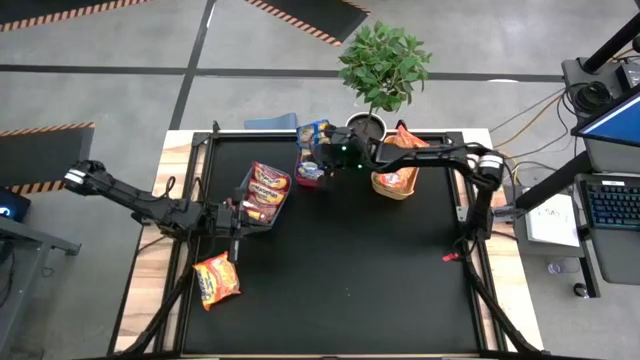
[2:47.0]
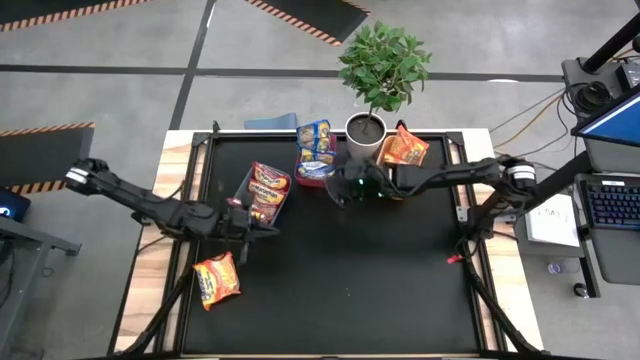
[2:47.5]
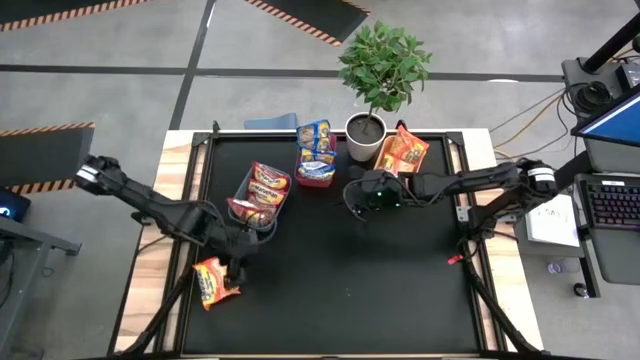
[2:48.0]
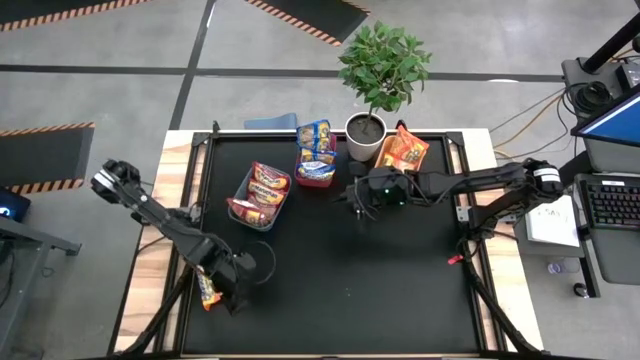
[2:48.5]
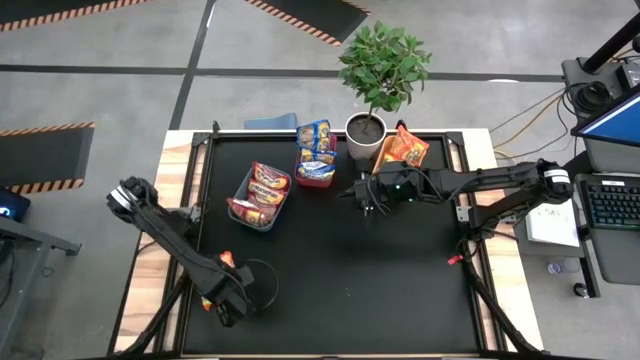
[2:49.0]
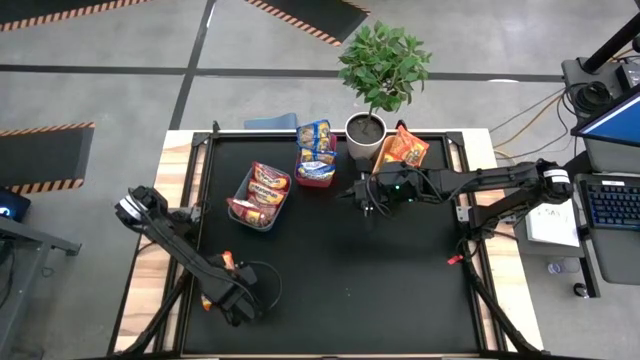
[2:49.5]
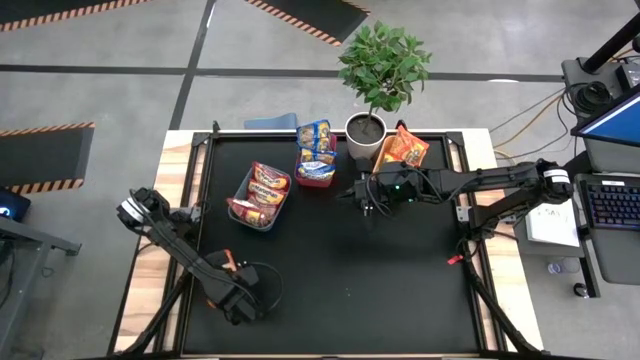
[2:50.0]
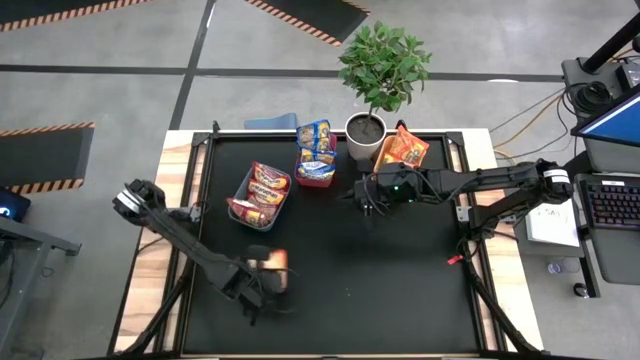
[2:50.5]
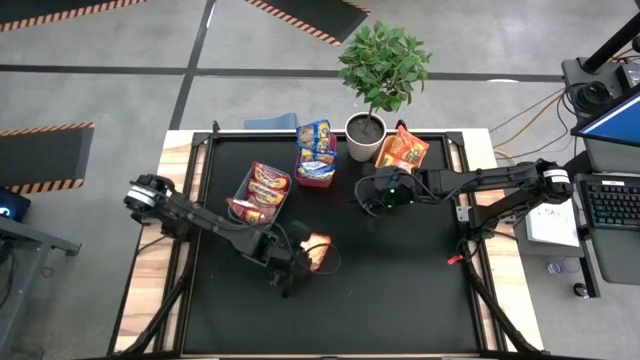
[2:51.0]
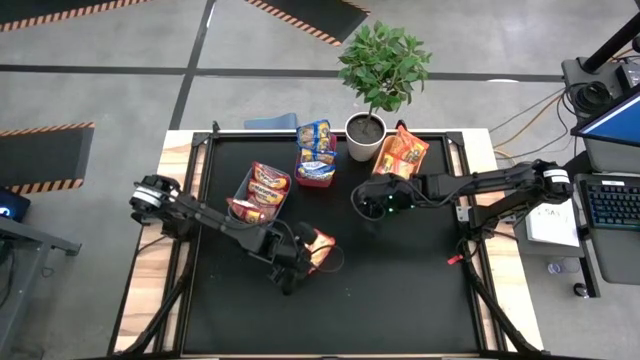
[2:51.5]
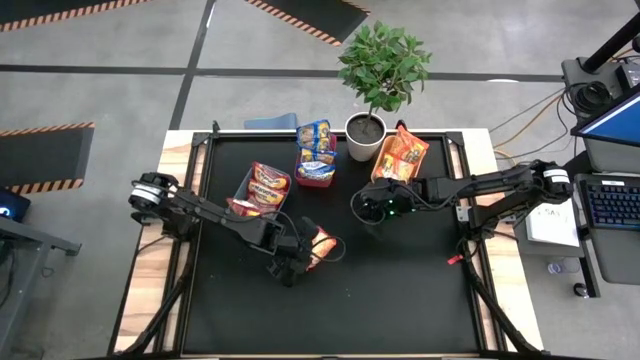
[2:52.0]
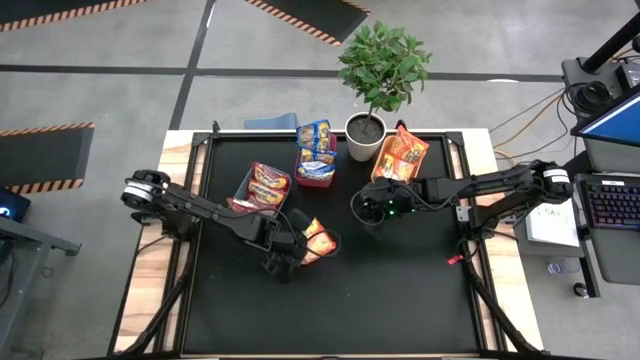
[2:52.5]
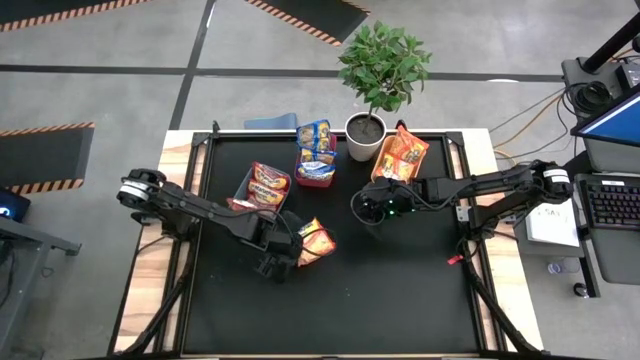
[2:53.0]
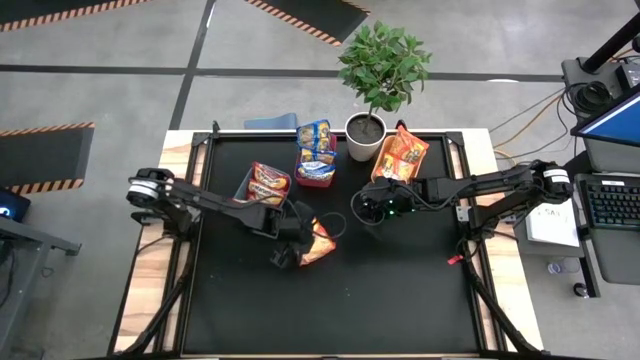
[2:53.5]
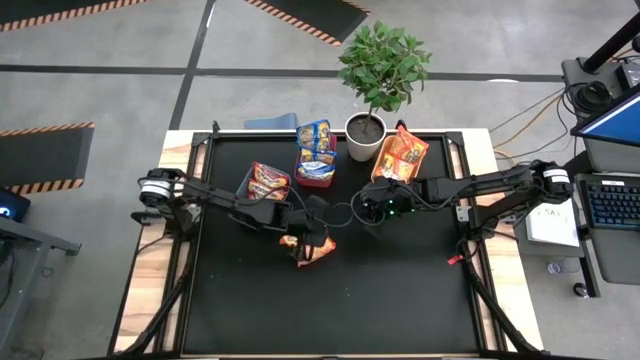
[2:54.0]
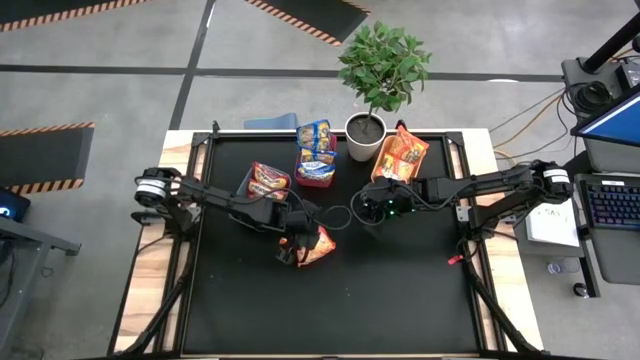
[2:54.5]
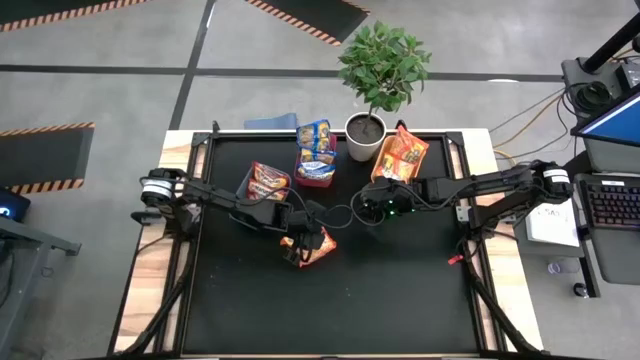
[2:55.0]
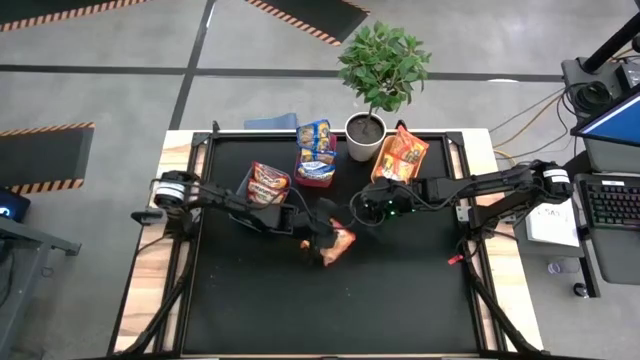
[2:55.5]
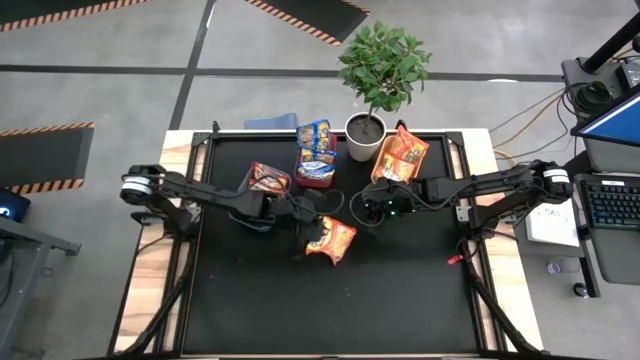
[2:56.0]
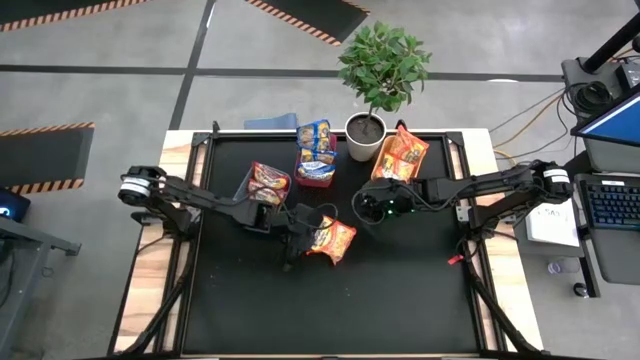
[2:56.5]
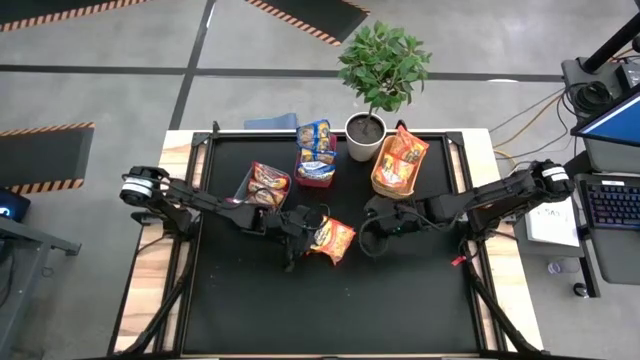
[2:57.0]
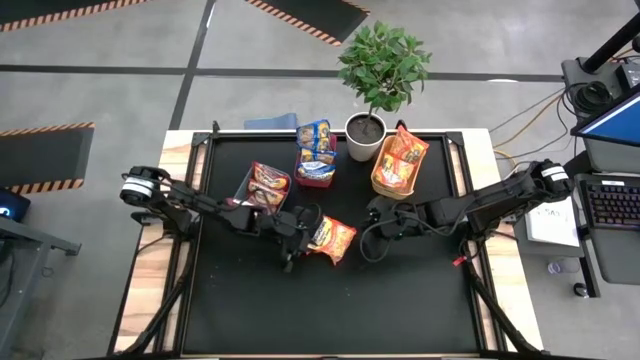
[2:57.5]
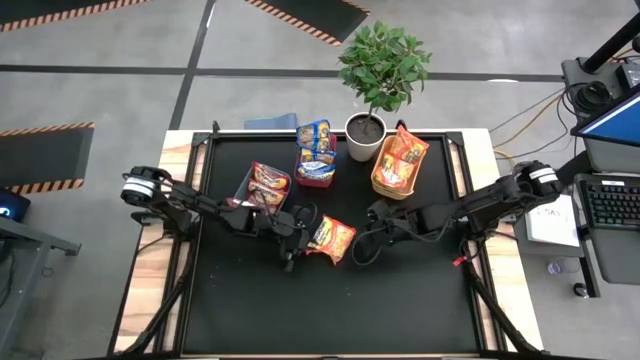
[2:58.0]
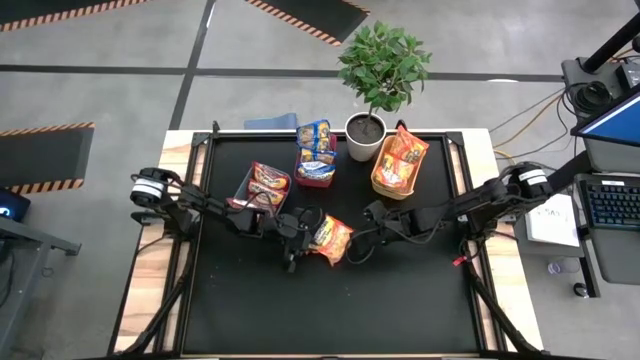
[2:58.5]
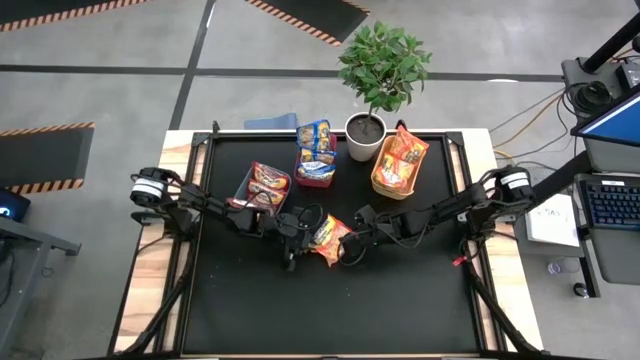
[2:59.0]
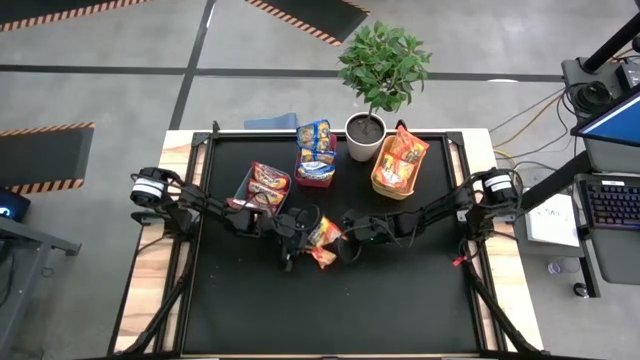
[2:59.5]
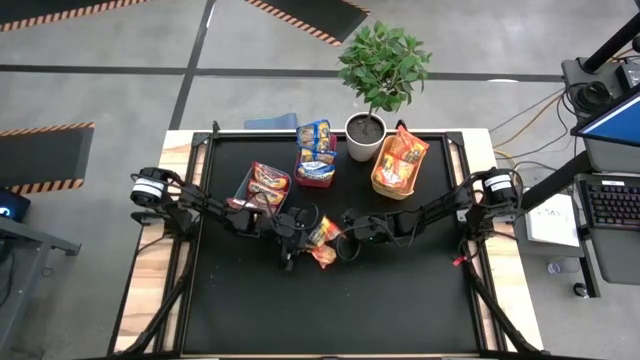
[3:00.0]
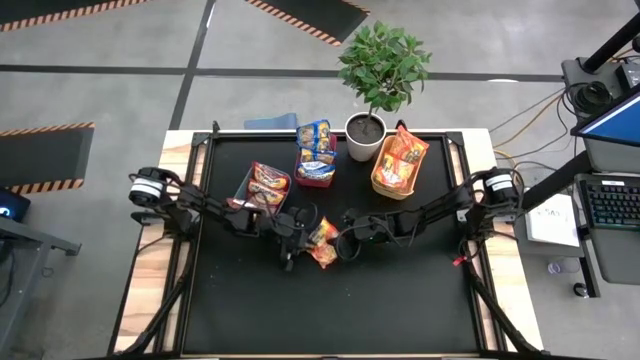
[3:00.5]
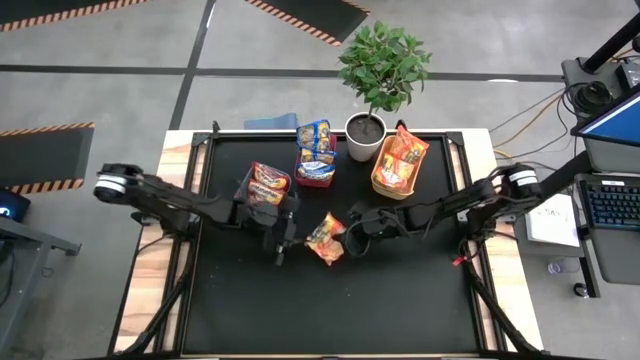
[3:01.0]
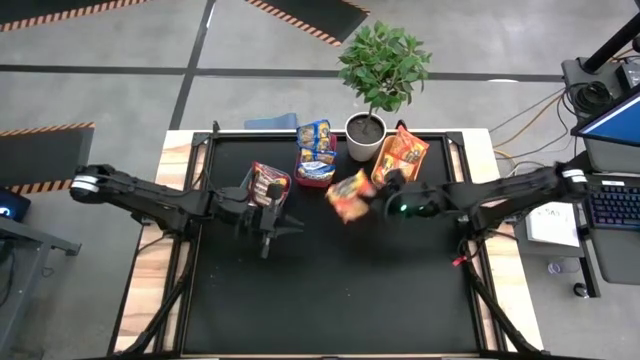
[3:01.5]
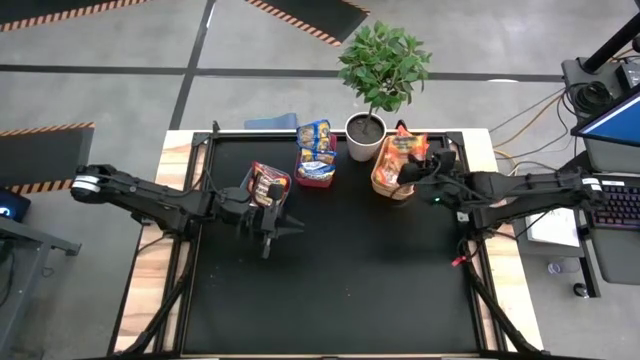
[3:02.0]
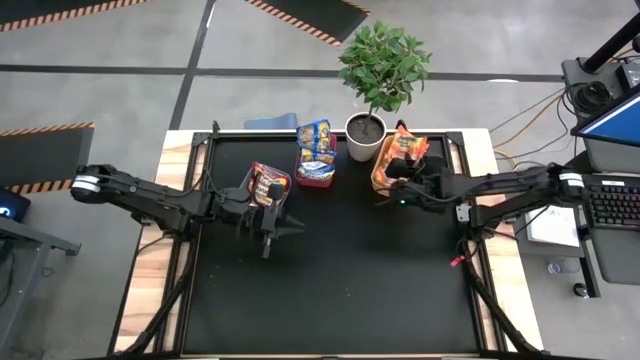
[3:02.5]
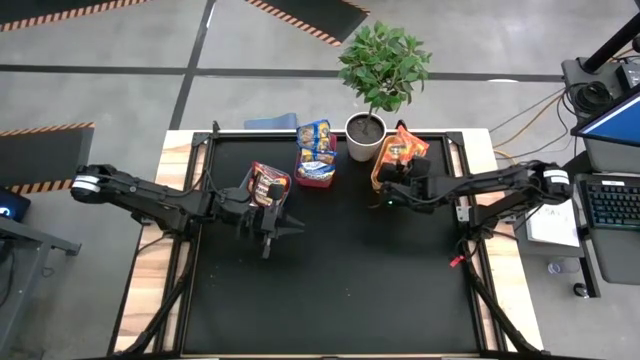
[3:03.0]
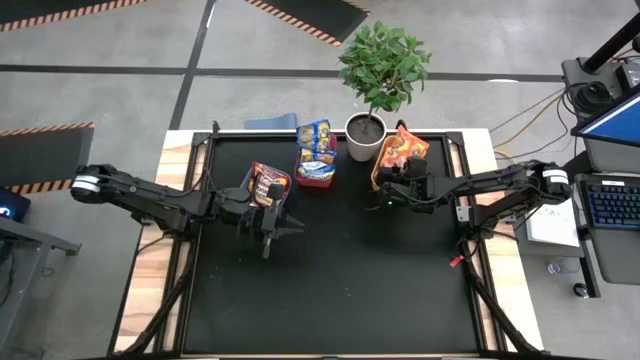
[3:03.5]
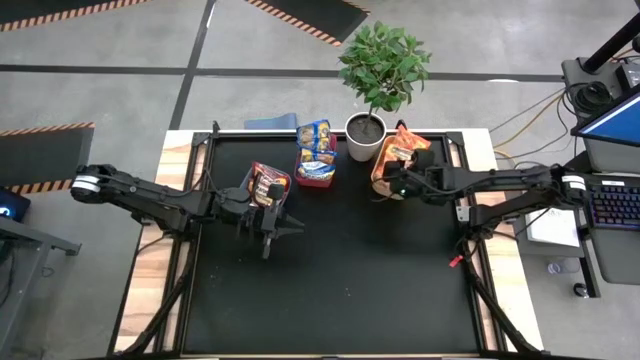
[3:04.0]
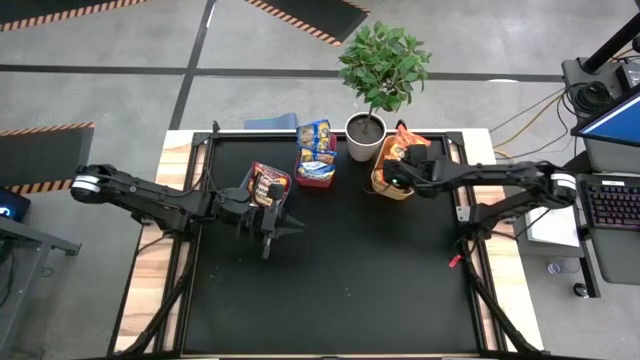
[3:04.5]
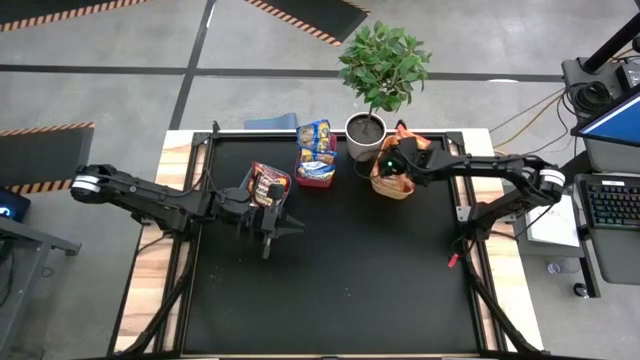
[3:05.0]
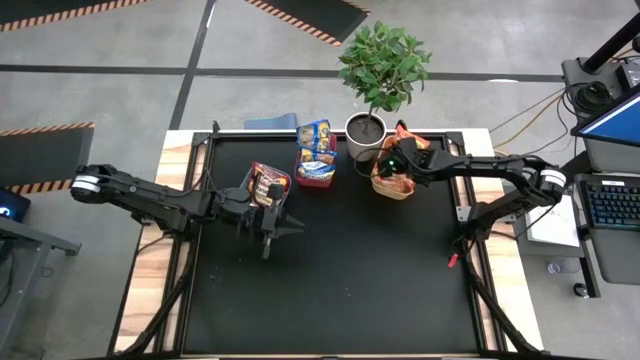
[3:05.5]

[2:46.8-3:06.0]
Task: Sort Maruchan noodles
Put the orange noodle pack into the yellow bin

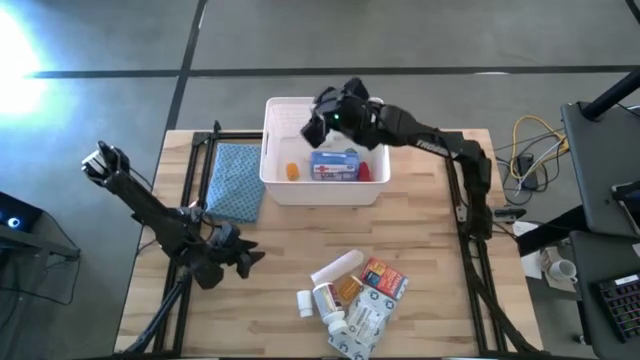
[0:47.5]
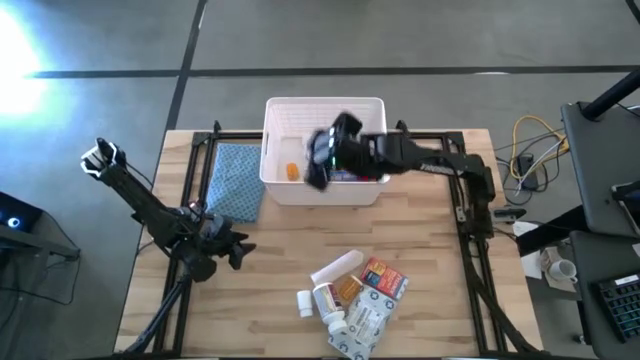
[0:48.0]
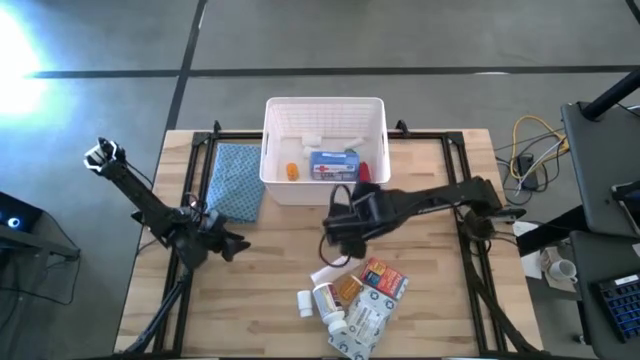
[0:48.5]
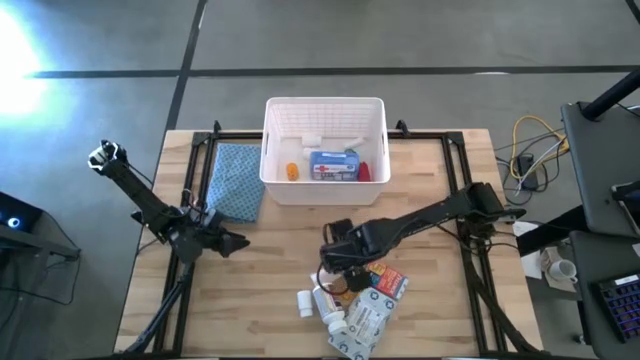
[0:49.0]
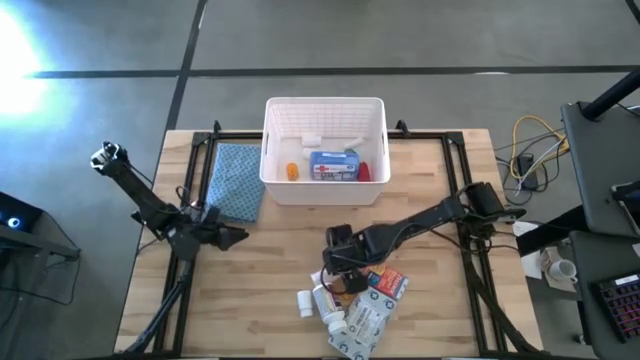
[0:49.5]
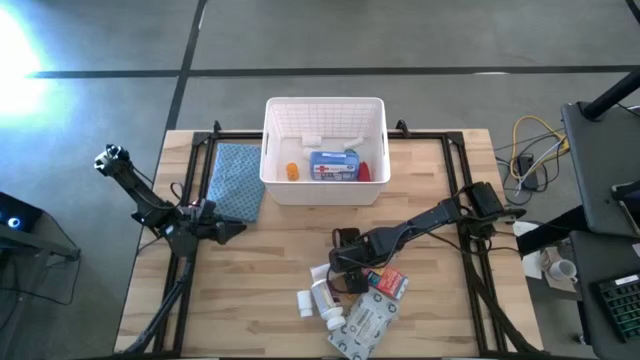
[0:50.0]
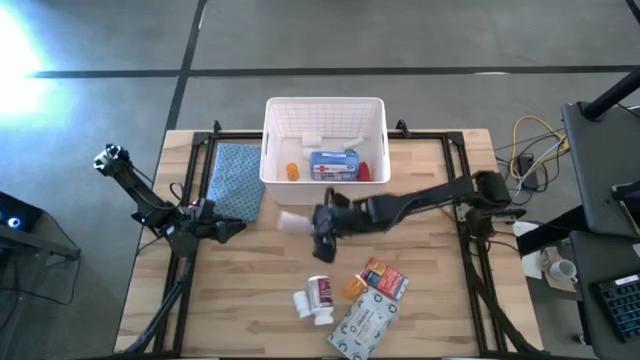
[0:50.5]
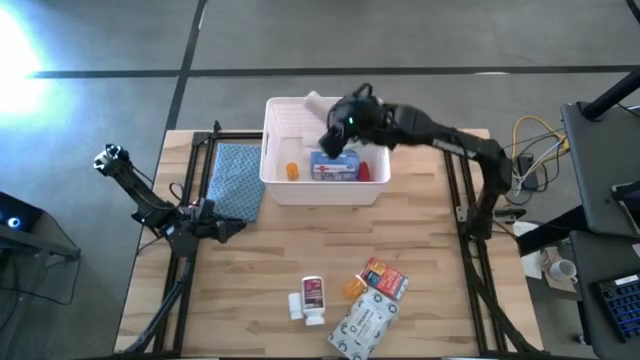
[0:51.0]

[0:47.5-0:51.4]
Task: Pick & place medical supplies in basket/bin
Put the white bandage into the white bin
